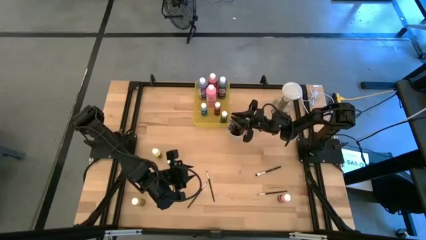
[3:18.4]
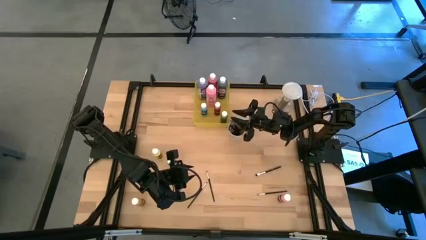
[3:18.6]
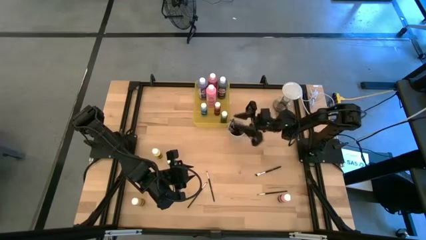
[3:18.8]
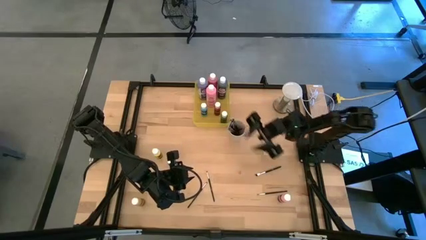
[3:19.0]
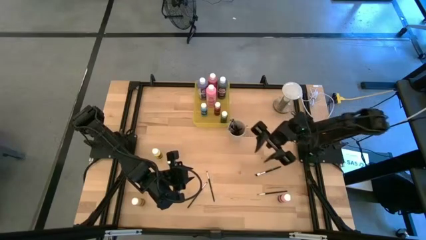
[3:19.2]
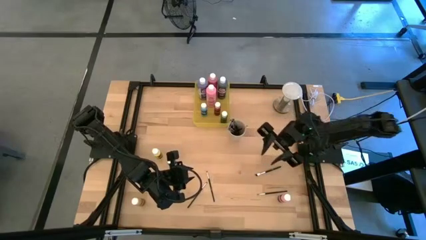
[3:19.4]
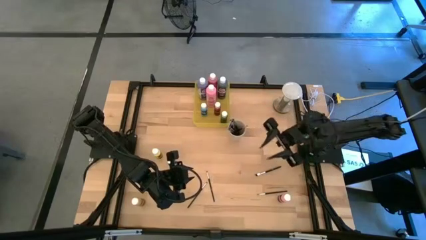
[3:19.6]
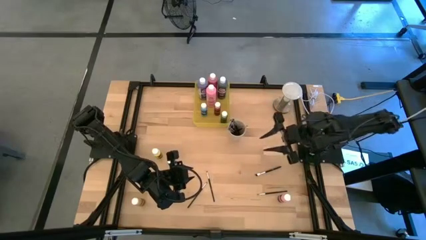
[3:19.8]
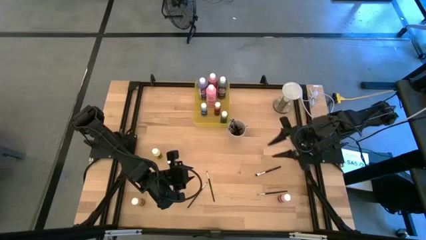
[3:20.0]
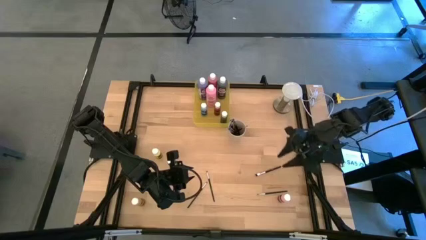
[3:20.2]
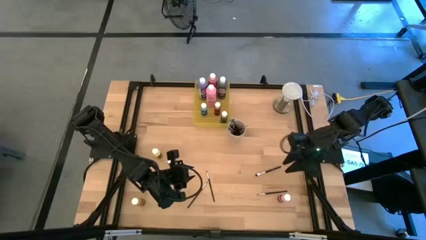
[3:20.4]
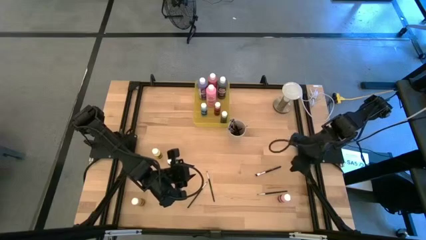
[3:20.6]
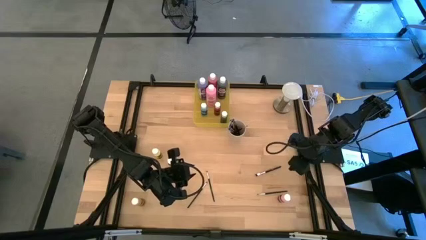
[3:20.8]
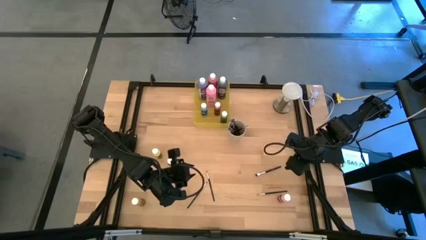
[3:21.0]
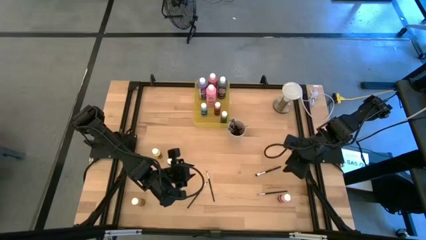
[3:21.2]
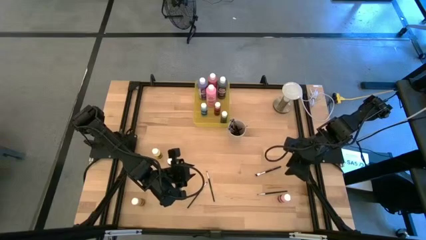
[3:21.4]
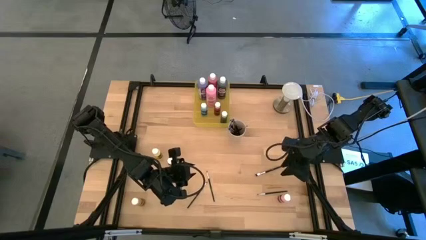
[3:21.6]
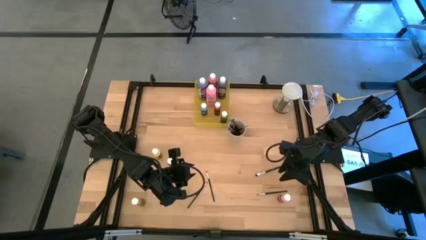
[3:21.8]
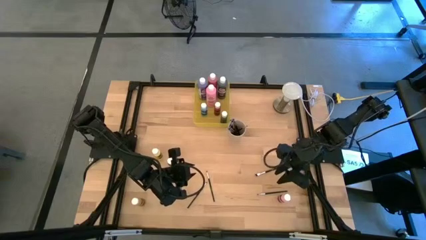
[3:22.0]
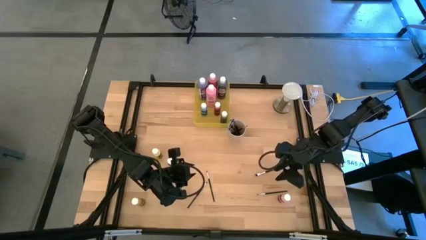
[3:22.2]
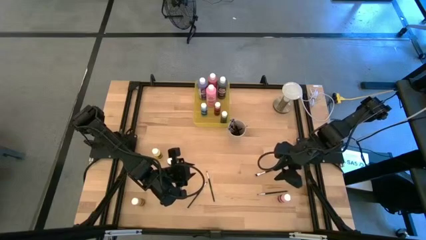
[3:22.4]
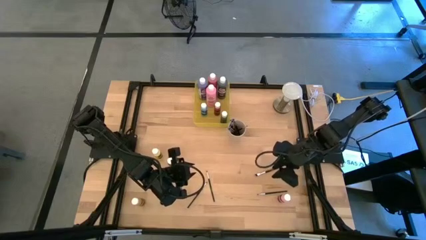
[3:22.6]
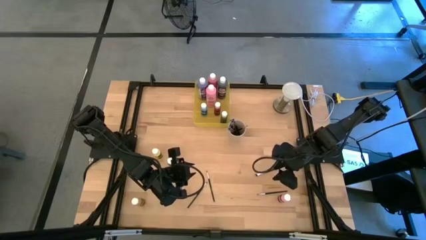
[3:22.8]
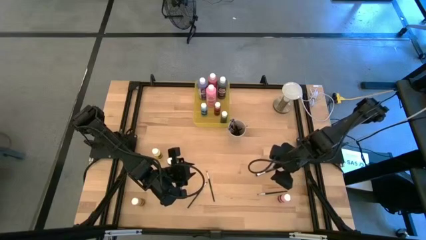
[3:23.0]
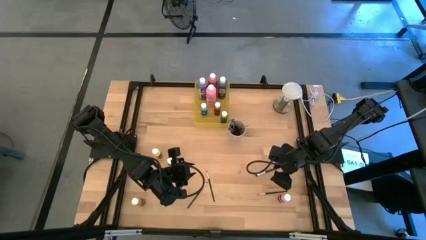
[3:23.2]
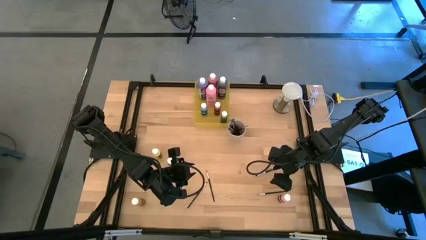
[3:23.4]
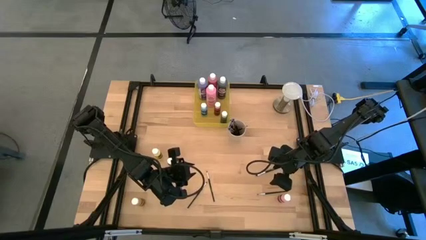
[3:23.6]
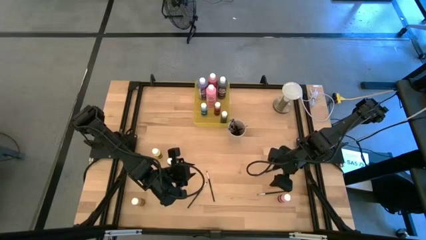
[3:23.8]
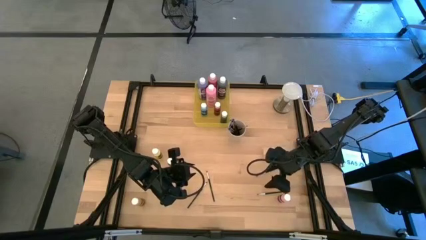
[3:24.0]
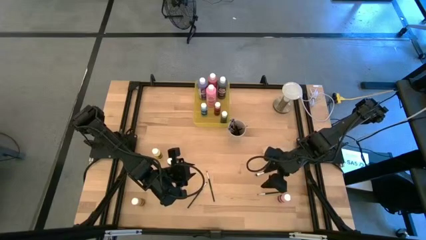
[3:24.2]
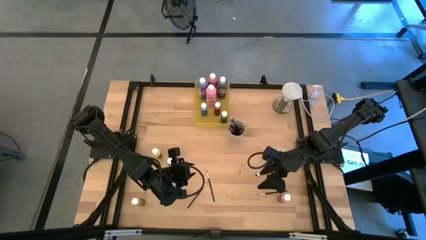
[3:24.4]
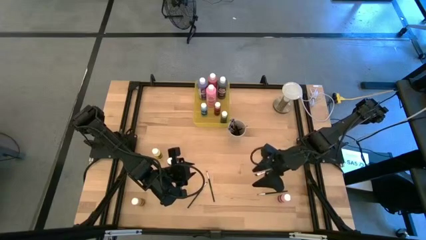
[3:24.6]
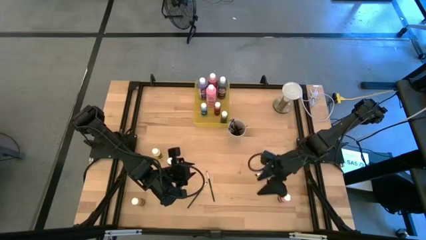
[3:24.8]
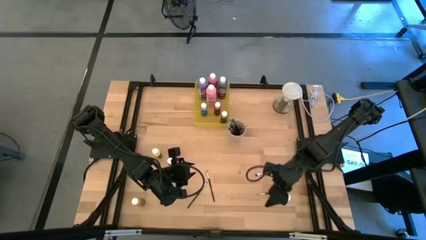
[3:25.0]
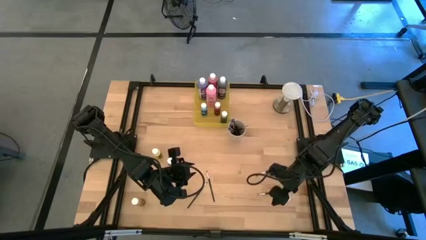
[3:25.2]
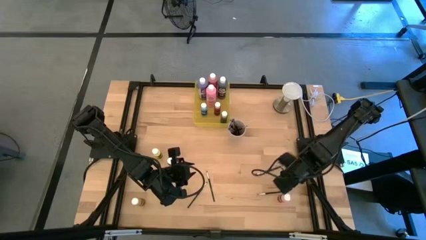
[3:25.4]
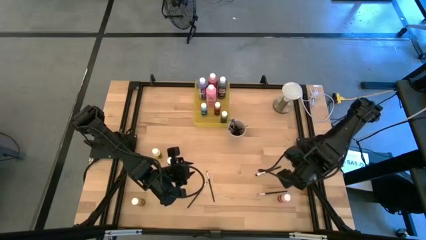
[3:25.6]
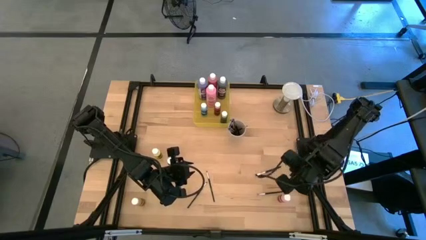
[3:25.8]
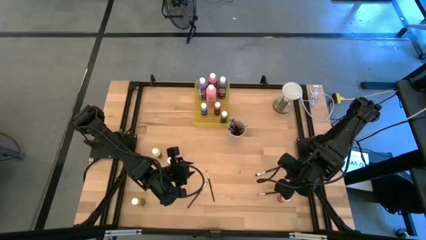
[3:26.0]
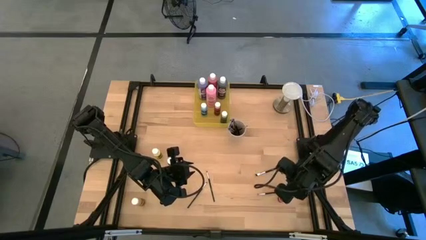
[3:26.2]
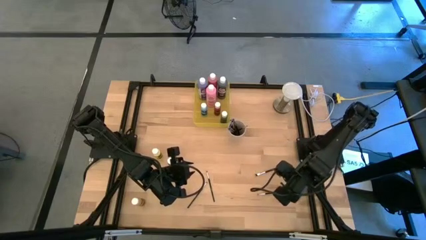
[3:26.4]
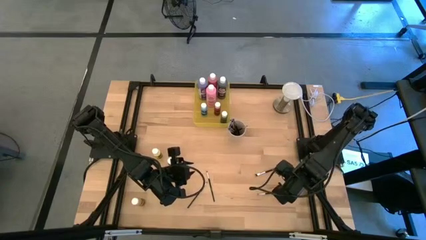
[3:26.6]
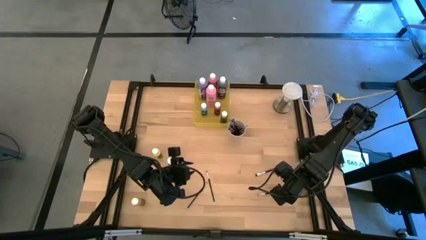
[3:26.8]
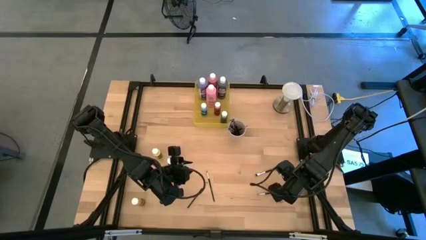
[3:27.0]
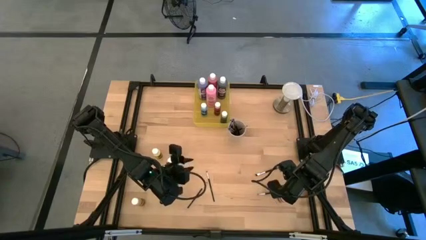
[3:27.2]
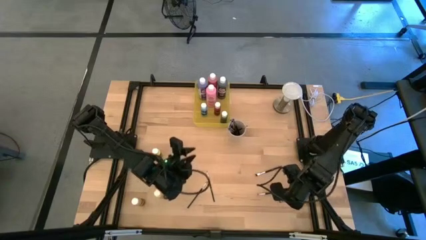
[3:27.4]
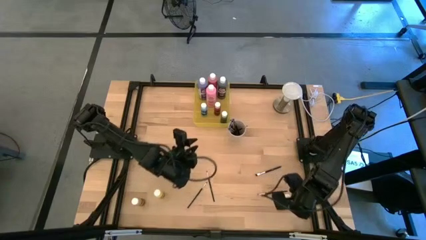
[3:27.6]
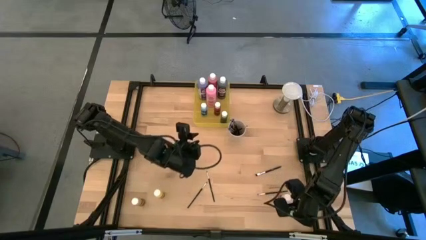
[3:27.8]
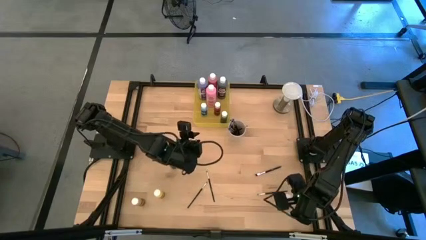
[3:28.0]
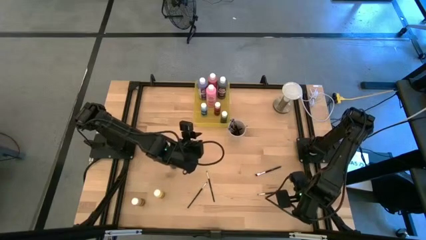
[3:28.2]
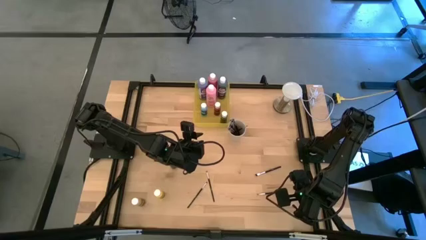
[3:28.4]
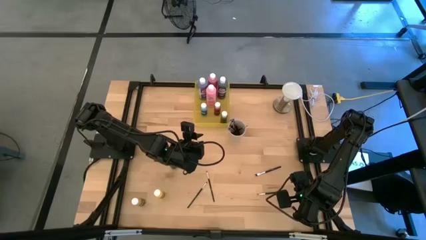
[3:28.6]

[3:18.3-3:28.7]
Task: Pick & Place Paint Supplies
Put the small light pink paint bottle into the yellow bin

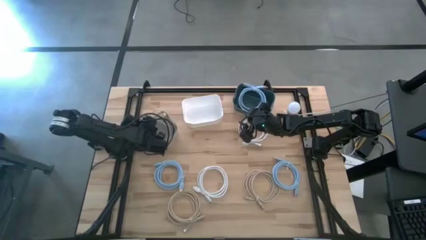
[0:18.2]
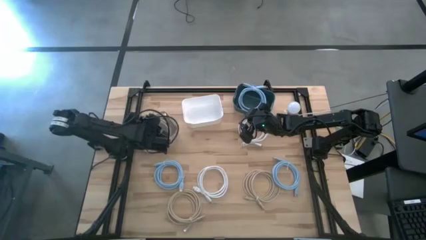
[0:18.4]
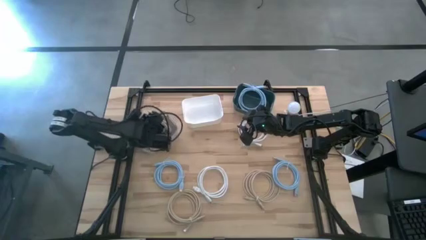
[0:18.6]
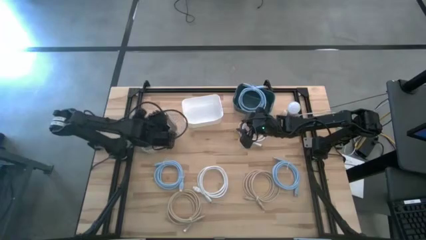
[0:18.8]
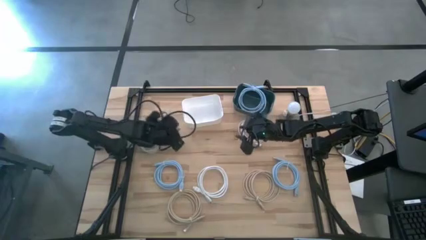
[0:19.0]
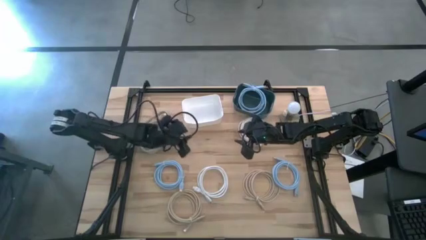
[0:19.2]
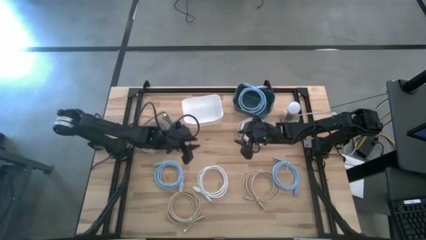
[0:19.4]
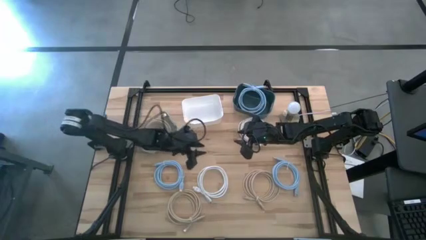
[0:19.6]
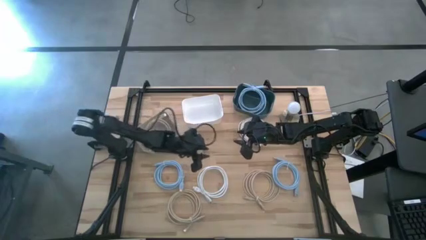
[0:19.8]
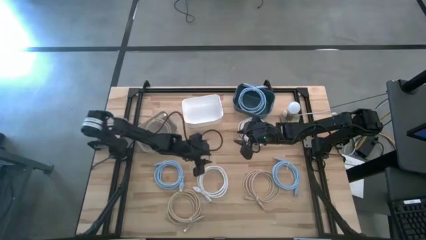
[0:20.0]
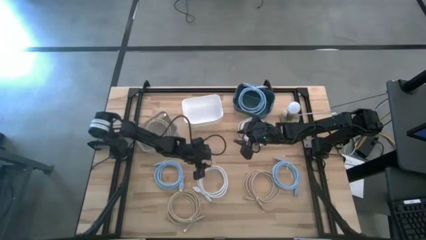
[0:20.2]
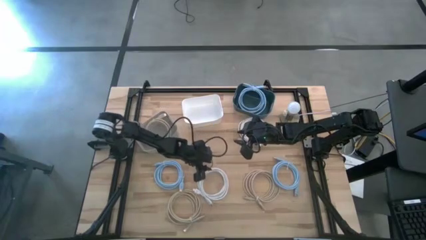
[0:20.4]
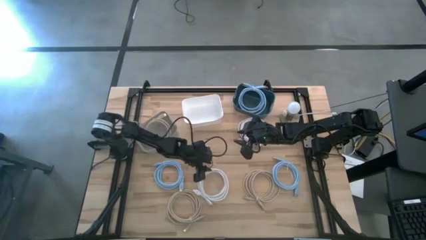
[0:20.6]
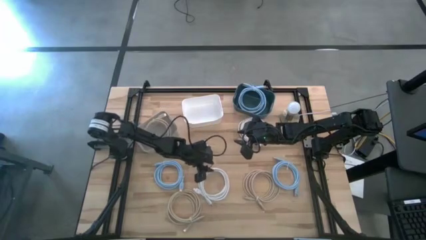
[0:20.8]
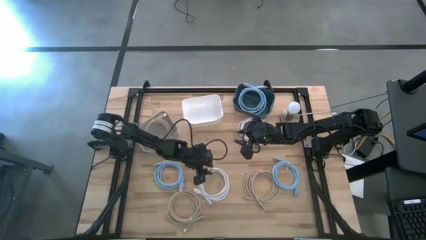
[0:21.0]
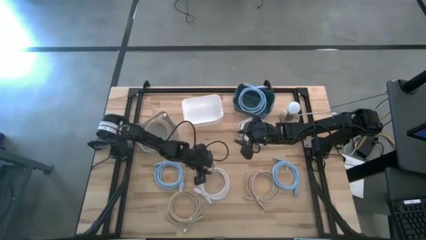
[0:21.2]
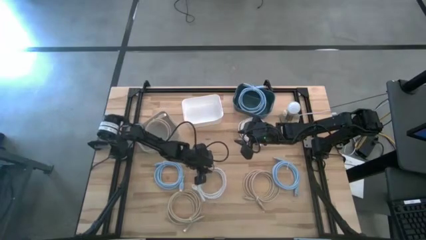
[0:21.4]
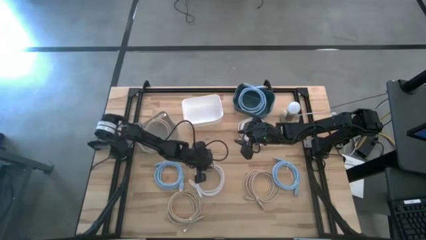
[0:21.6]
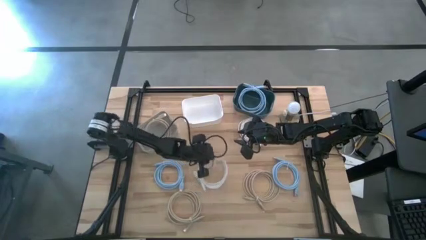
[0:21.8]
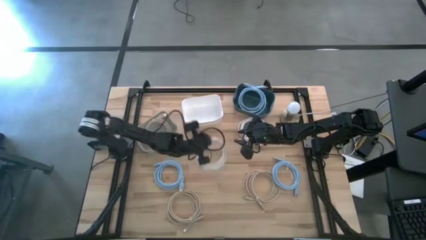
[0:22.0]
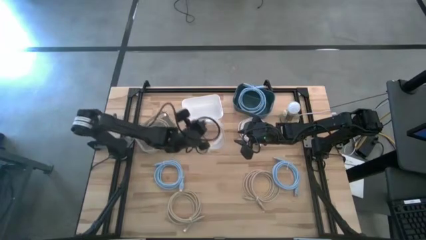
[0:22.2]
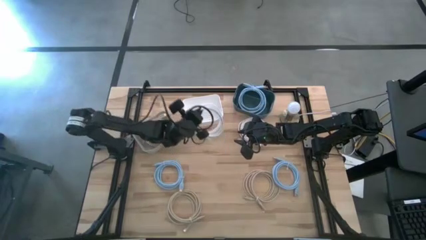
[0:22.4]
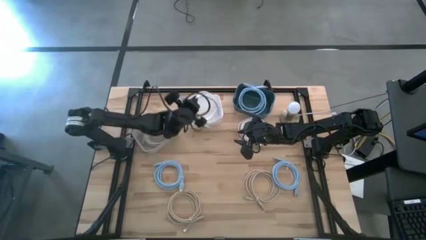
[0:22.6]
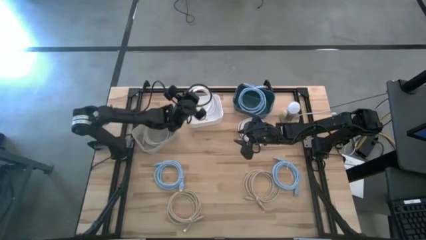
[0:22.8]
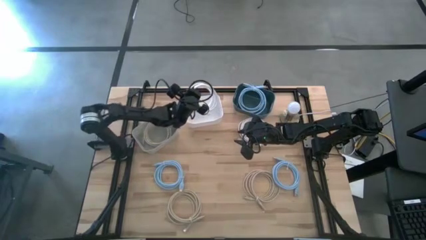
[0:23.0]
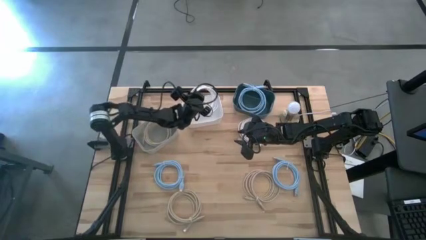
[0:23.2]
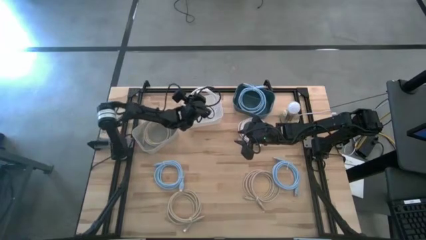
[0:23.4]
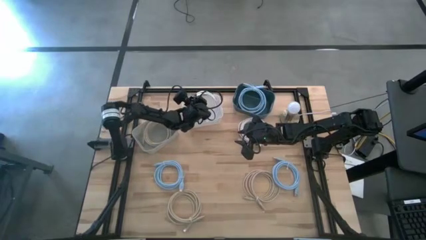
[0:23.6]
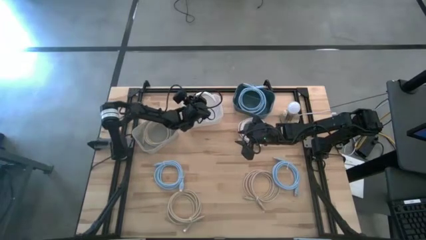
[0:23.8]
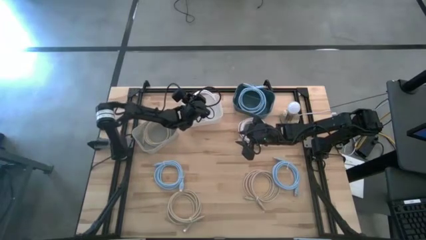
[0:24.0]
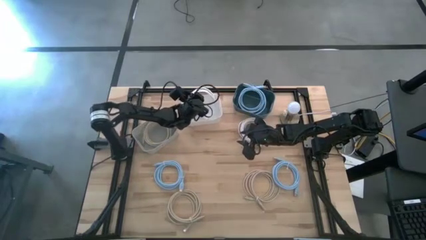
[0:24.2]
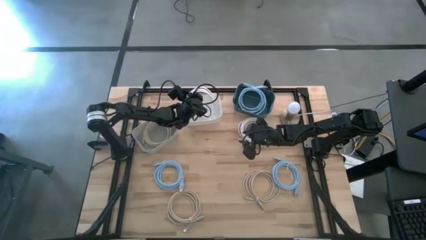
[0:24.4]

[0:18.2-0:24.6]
Task: Pick & Place USB Port
Put the bottom white charger cable into the white bin
